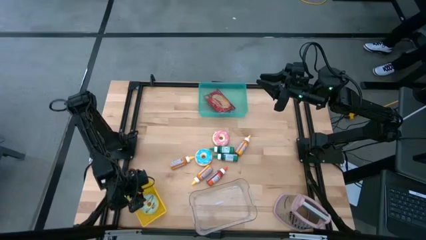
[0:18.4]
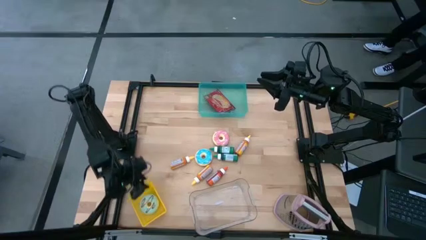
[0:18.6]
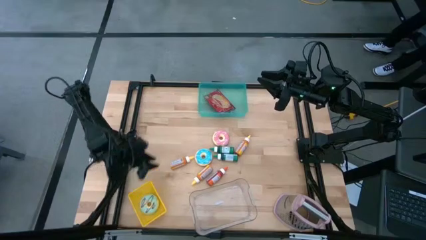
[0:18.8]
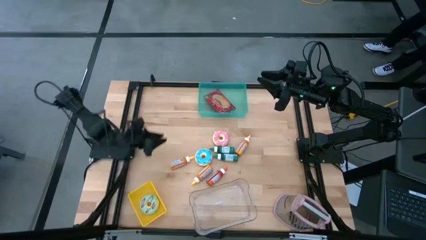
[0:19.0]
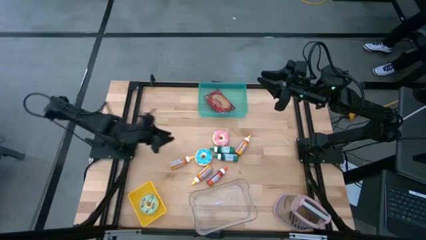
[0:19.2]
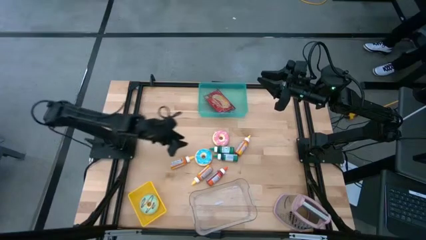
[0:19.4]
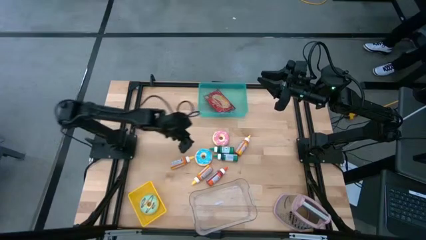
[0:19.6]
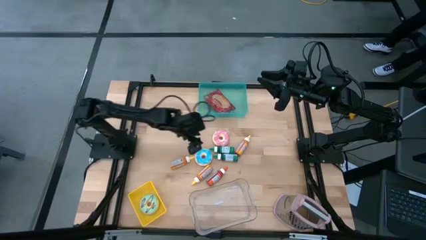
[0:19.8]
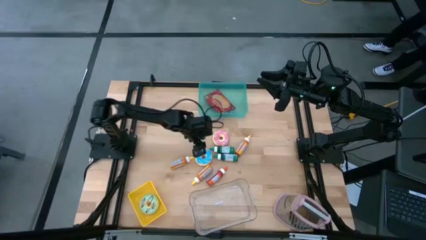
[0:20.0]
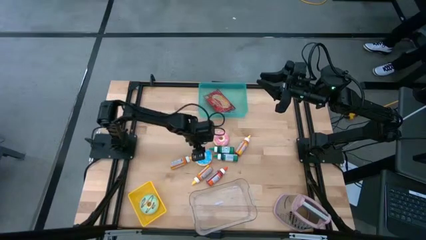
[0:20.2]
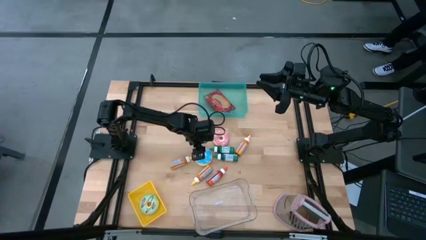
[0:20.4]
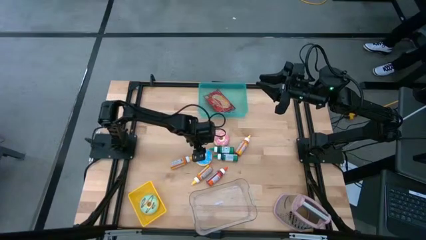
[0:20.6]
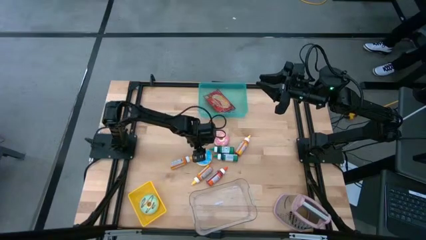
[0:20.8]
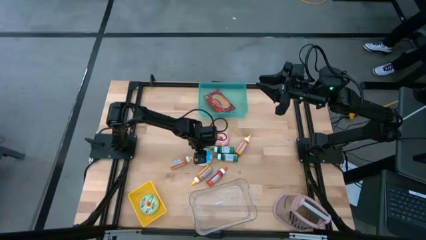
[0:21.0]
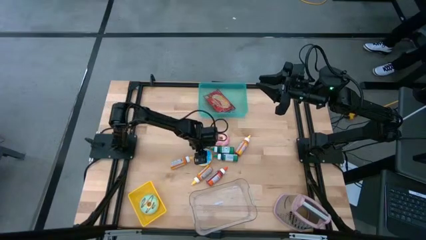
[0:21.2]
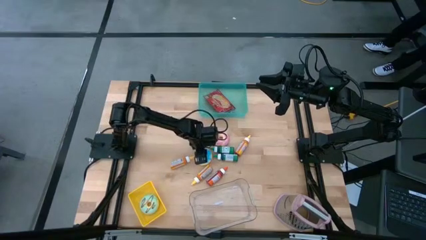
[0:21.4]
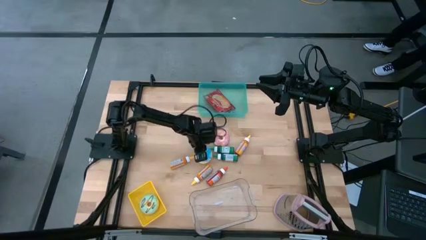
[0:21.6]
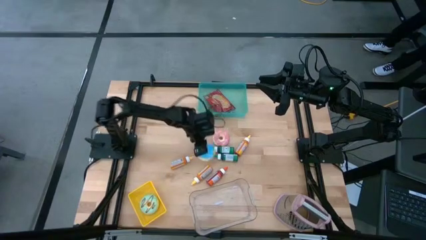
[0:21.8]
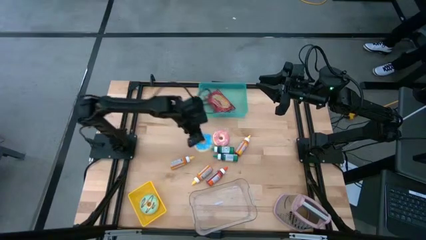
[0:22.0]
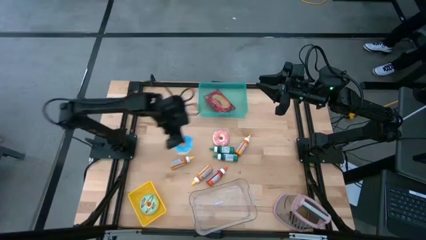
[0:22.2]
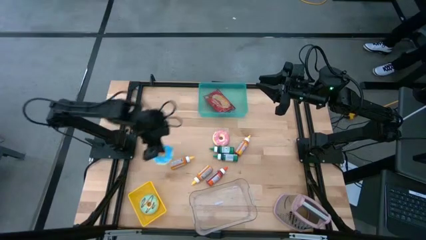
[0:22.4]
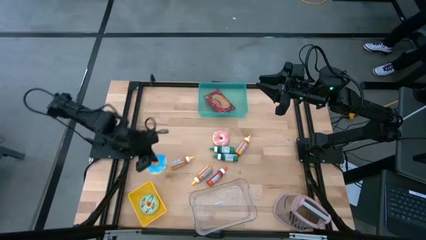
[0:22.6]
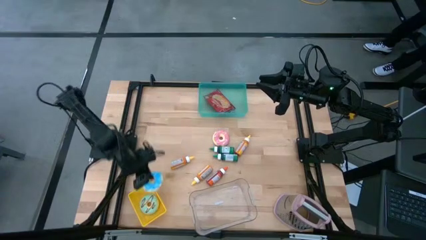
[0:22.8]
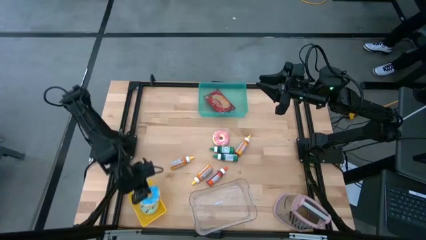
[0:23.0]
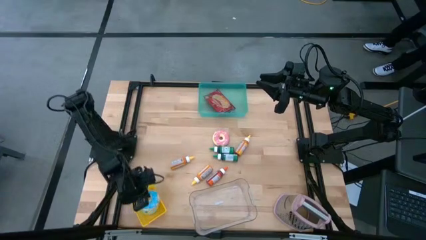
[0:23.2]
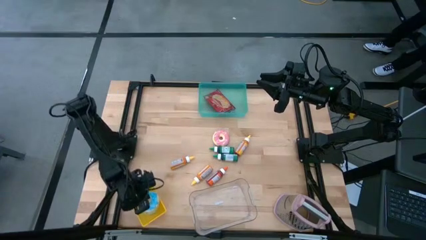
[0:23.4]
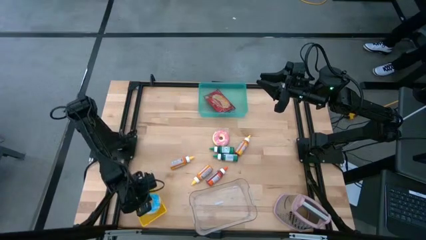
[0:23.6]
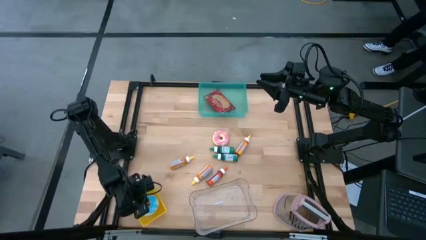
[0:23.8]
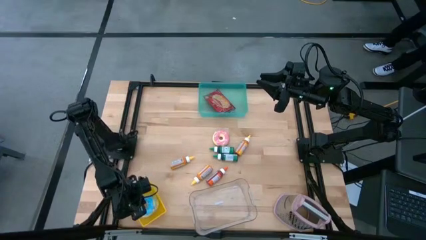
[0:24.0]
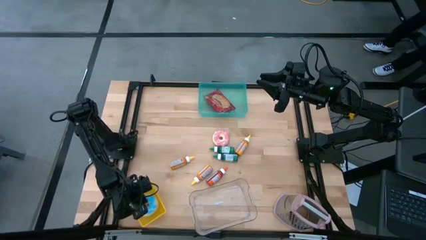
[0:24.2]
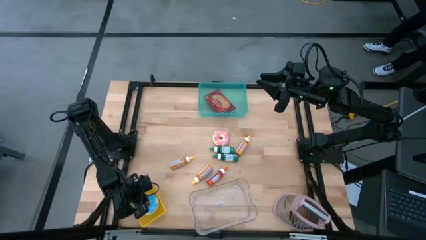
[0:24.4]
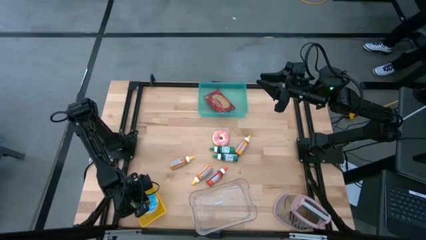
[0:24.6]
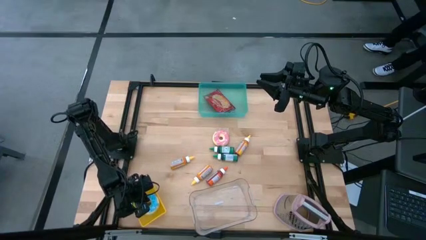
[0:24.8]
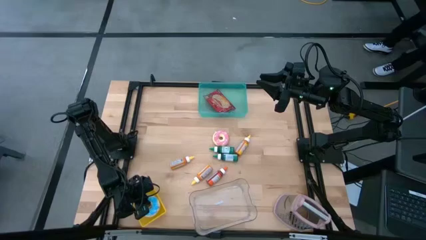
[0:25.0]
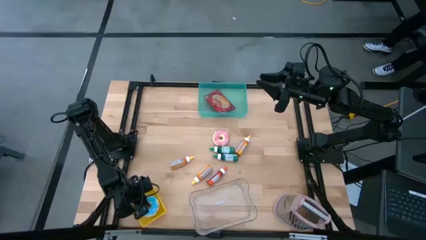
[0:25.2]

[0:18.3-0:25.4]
Put the blue donut into the yellow bin

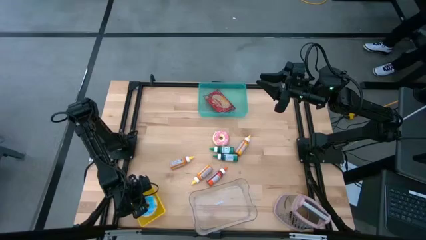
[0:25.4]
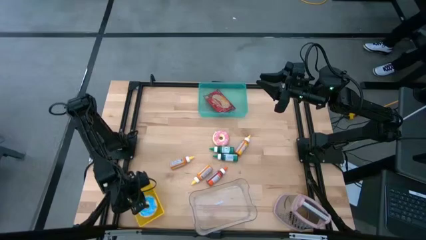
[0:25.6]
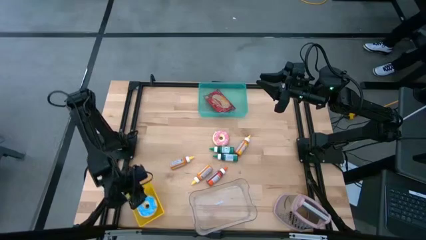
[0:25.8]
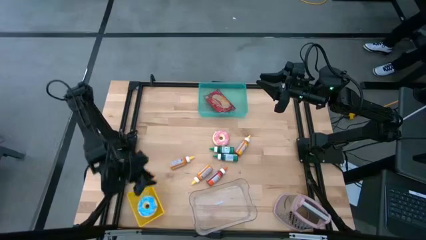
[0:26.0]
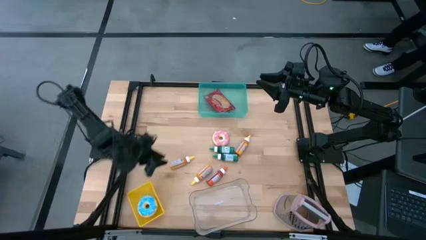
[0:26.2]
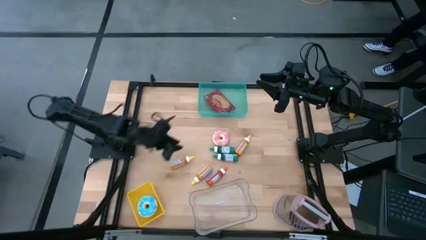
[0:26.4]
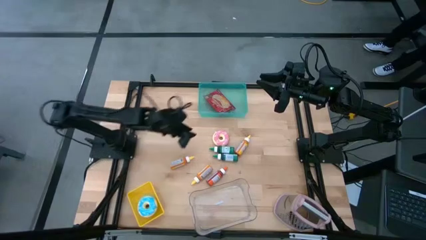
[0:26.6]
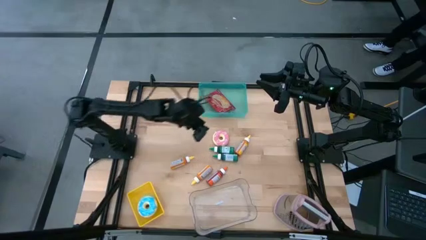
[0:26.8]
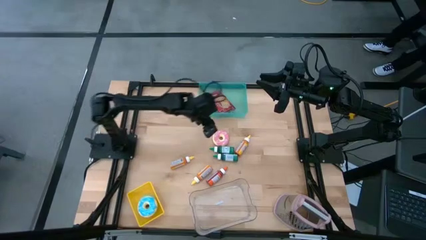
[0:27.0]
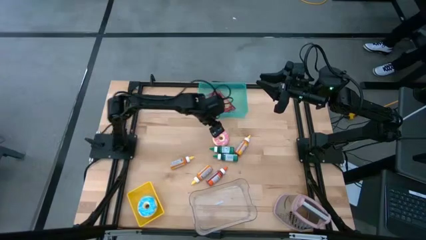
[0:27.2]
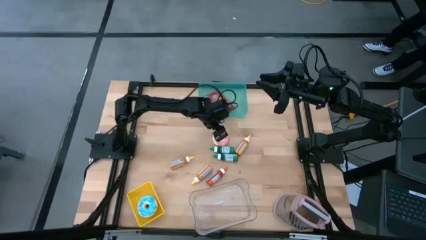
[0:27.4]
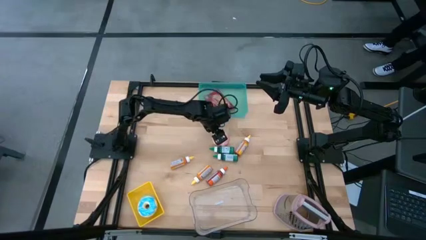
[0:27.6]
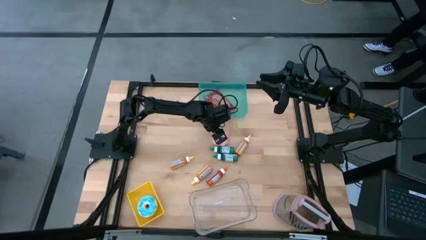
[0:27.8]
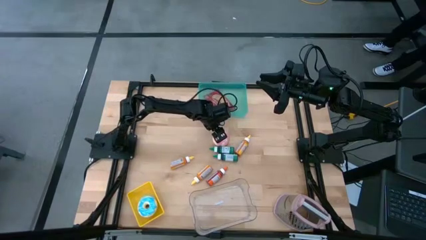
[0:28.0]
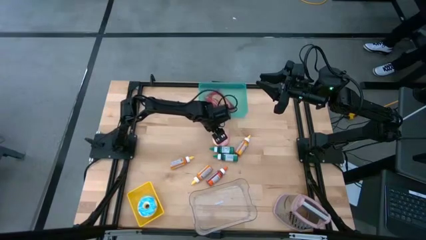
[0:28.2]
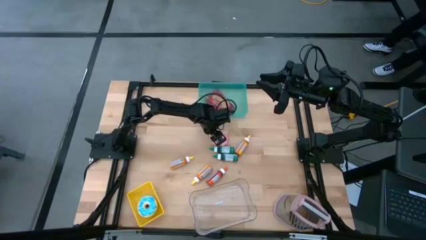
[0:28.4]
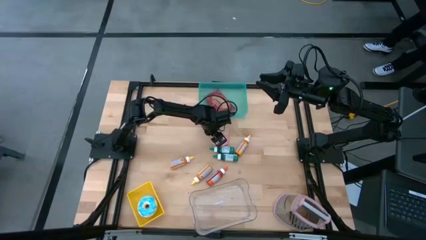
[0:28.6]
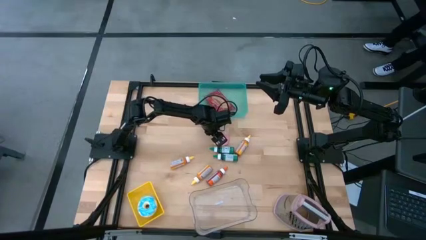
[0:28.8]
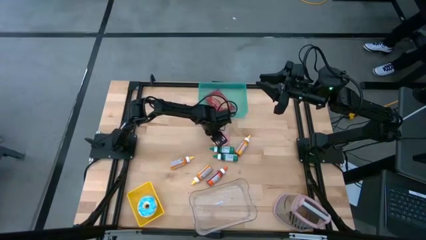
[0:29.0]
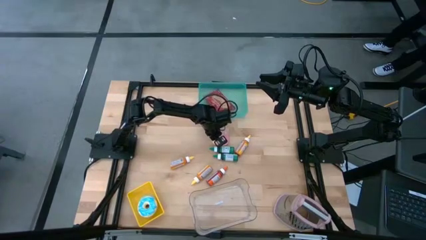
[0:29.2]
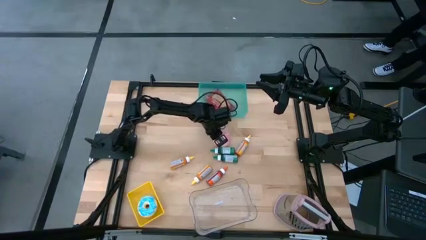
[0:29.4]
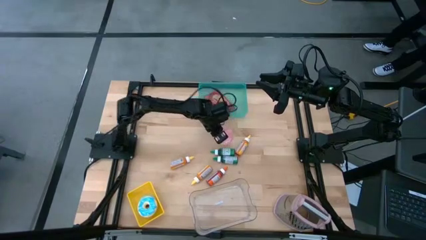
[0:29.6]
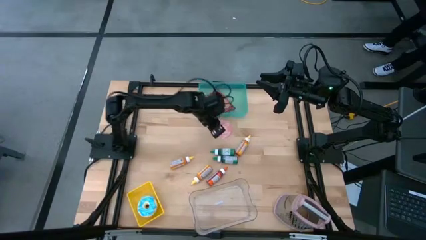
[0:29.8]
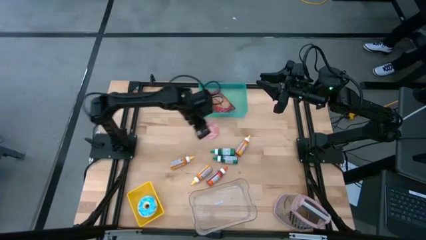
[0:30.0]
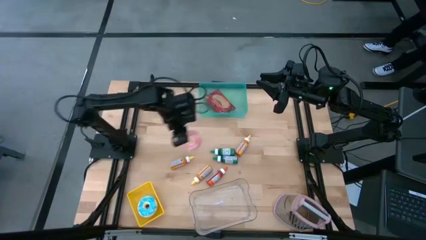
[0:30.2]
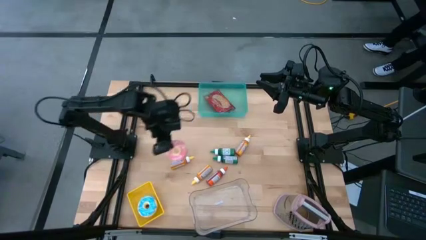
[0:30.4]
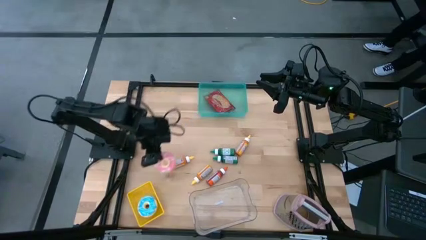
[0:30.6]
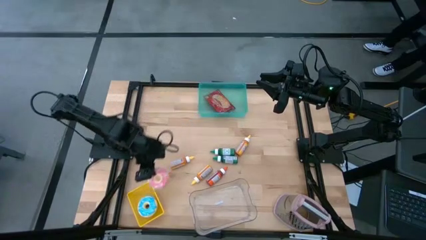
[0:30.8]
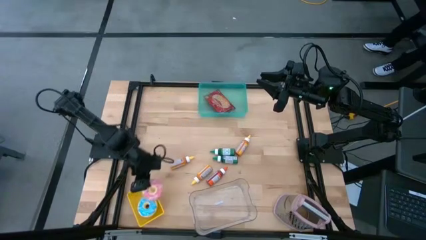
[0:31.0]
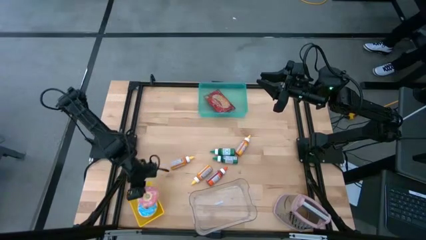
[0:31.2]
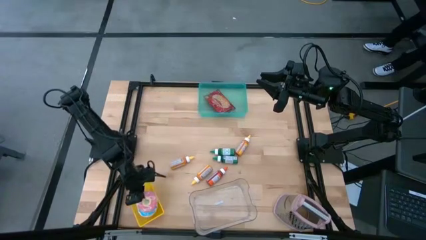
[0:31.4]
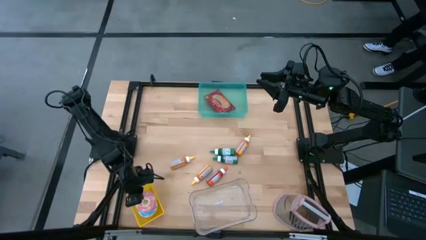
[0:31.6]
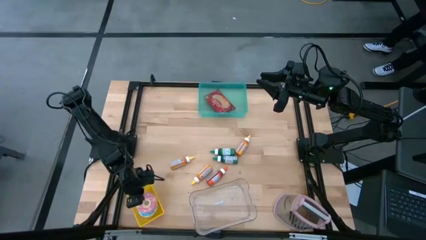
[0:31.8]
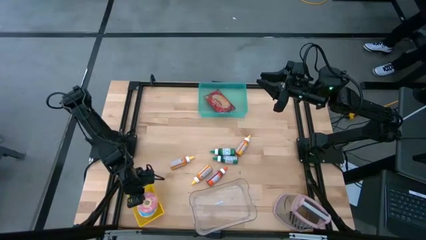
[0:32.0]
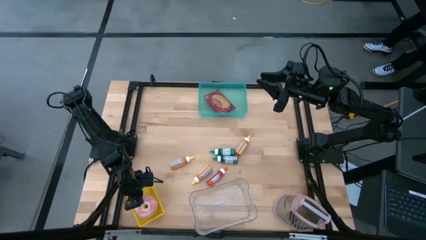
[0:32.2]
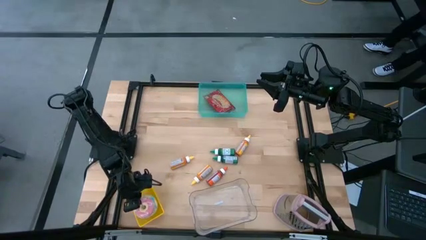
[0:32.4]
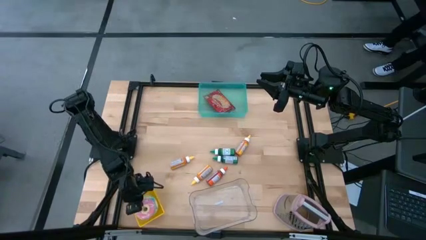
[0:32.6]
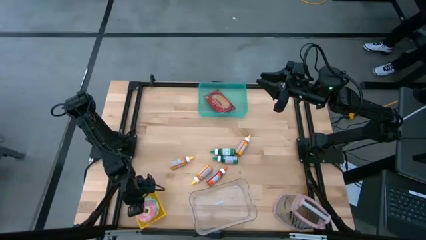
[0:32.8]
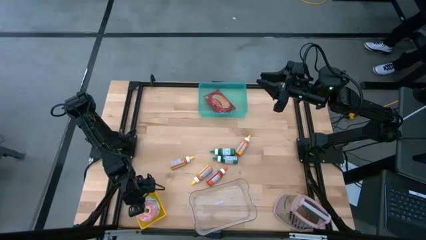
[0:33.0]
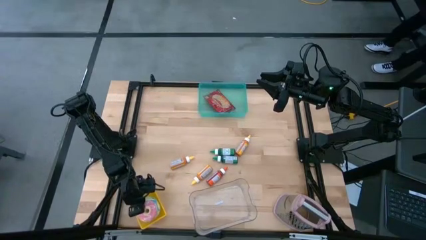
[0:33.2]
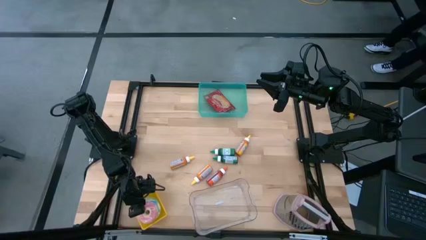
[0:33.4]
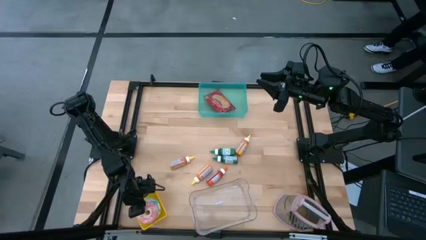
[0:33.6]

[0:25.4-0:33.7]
Put the pink donut into the yellow bin
